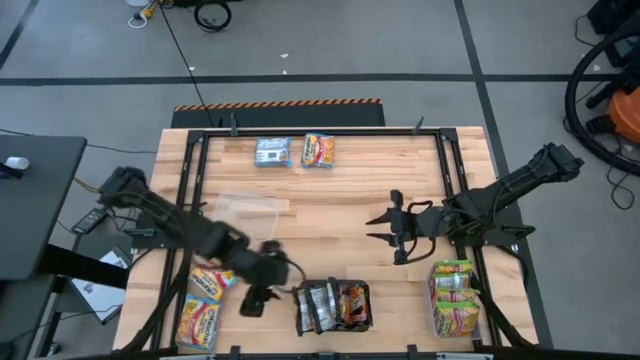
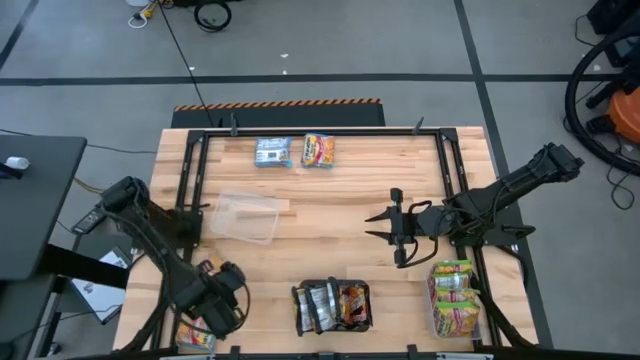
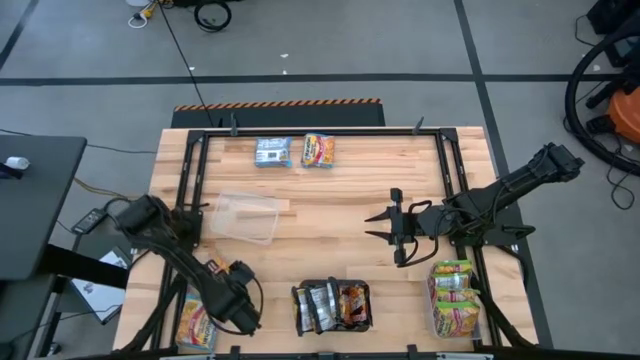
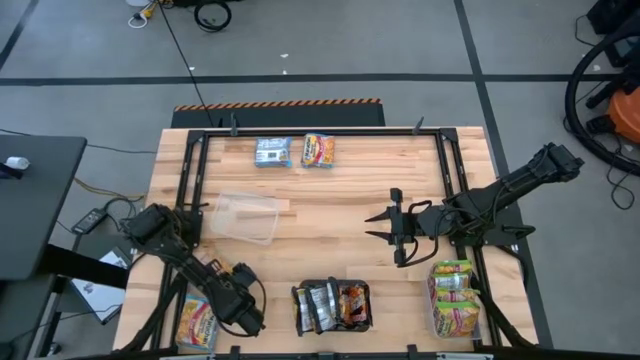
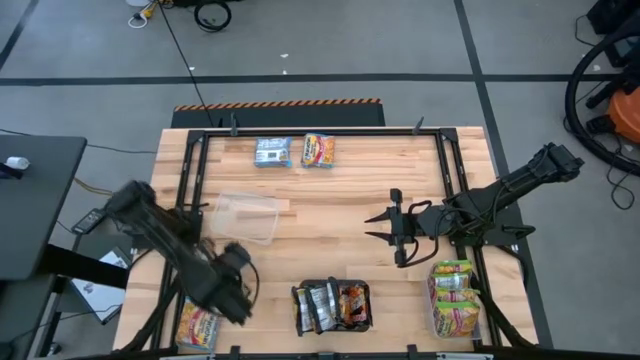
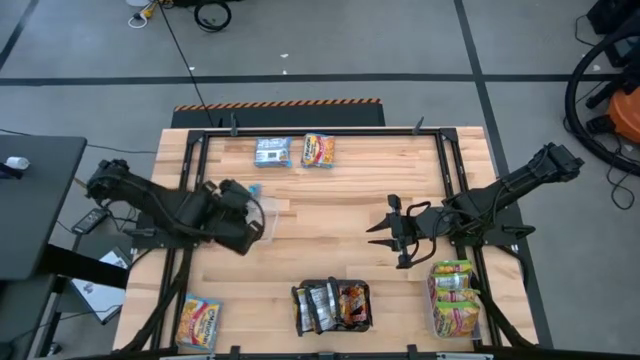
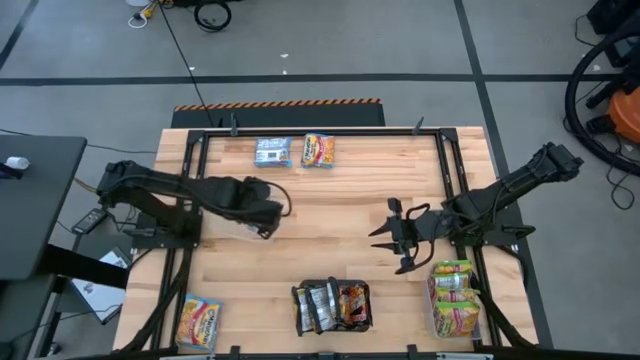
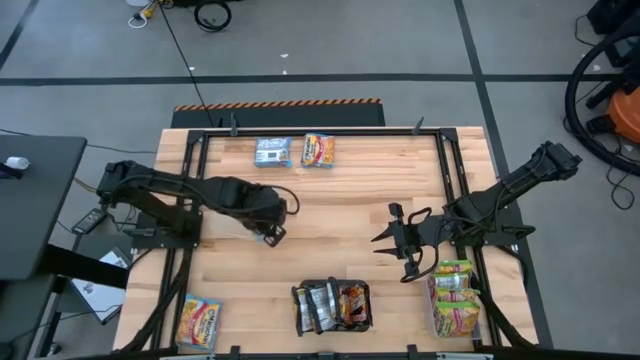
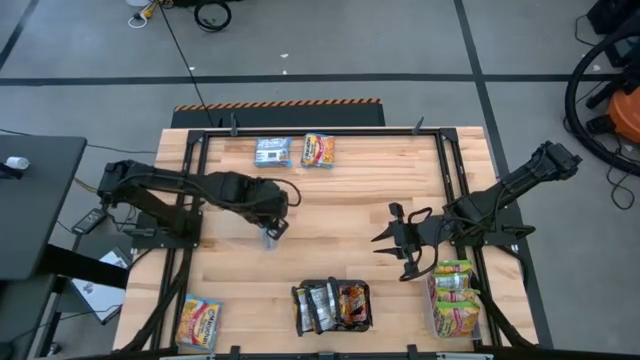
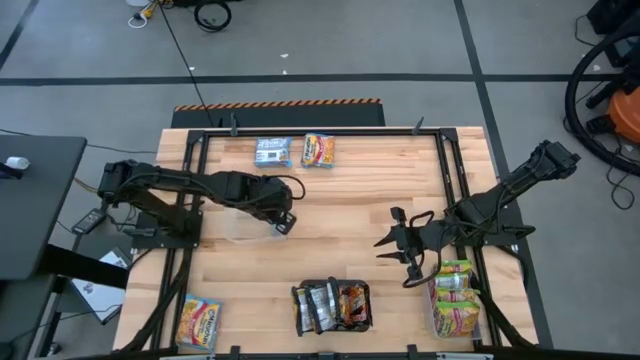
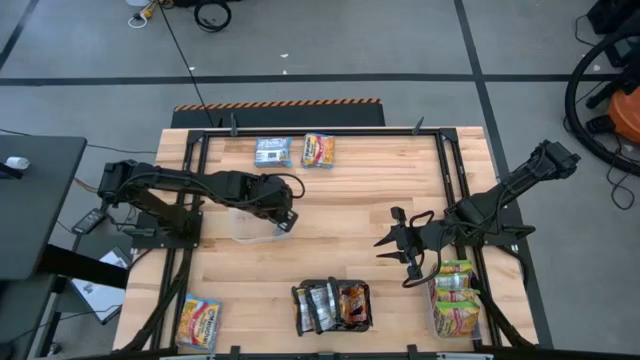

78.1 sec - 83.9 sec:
Task: Sort Maruchan noodles
Put the blue noodle pack into the top transparent bin

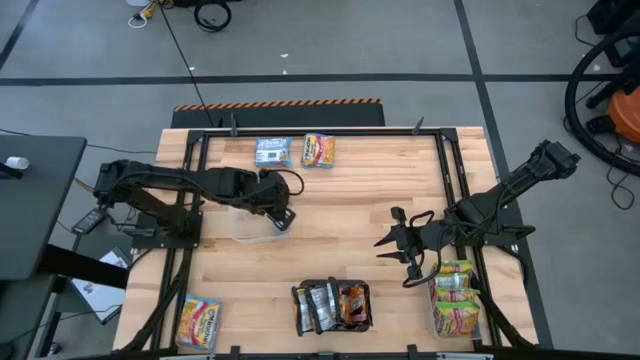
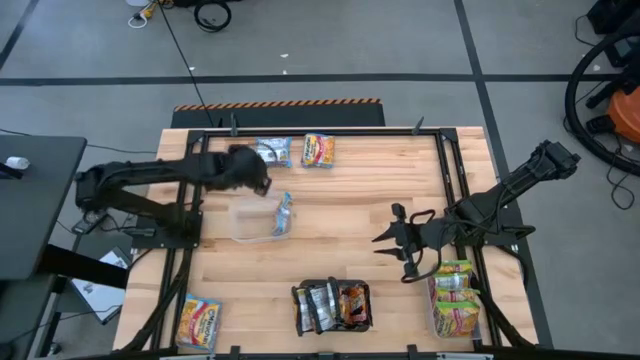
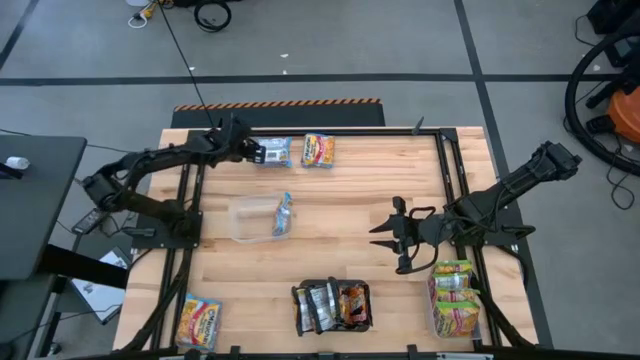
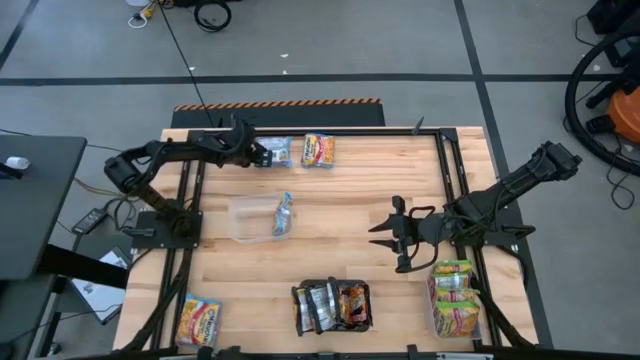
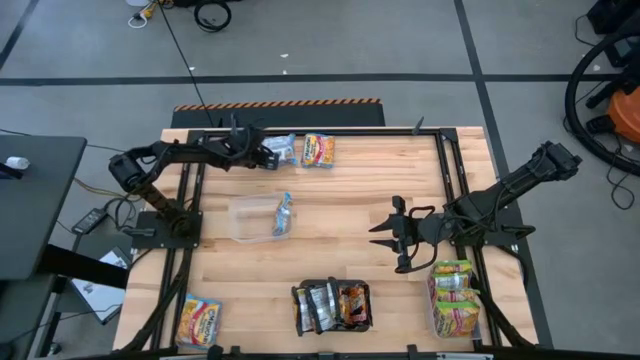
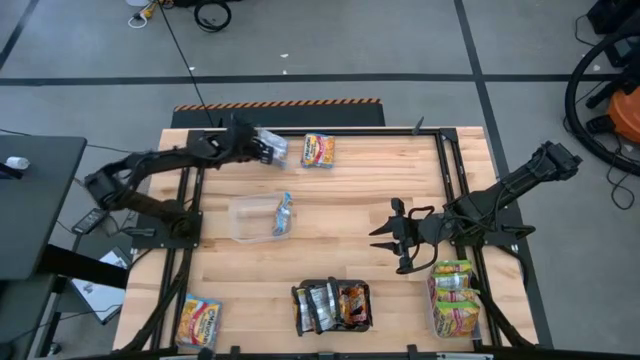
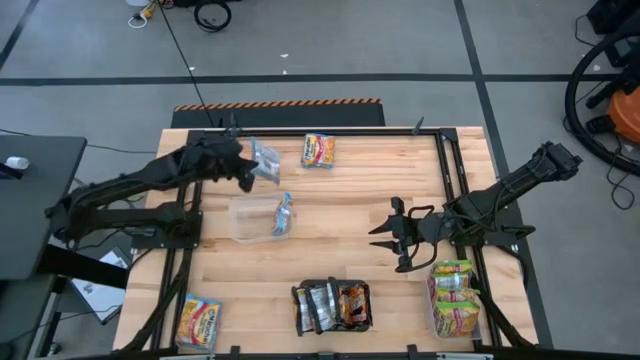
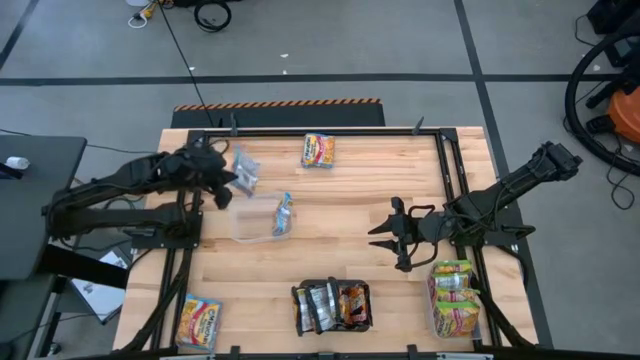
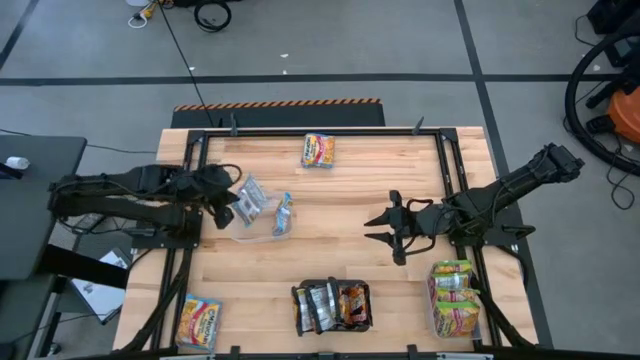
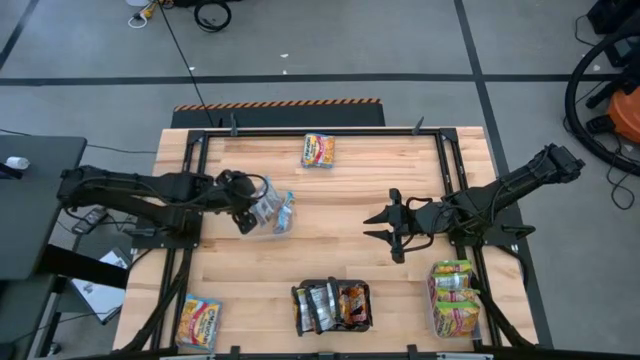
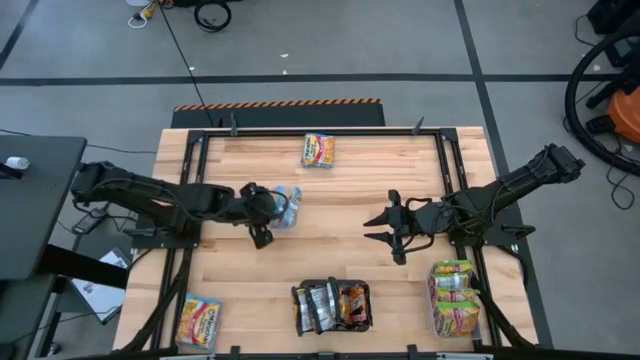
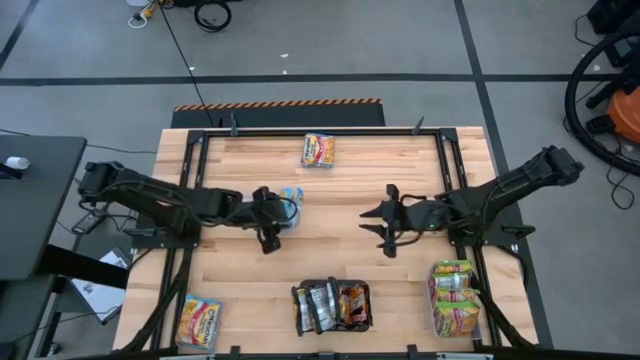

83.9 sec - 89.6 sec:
Put the top left blue noodle pack into the top transparent bin

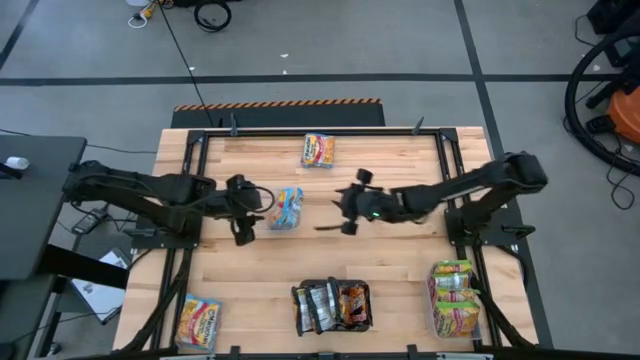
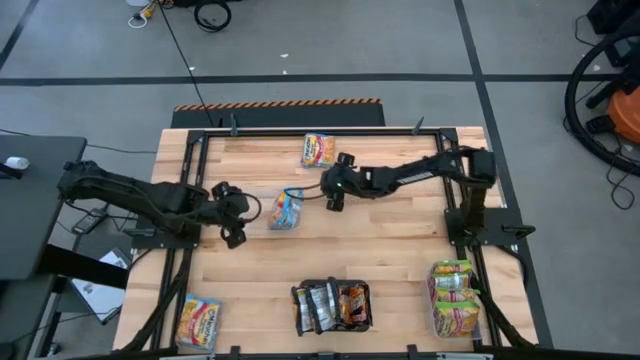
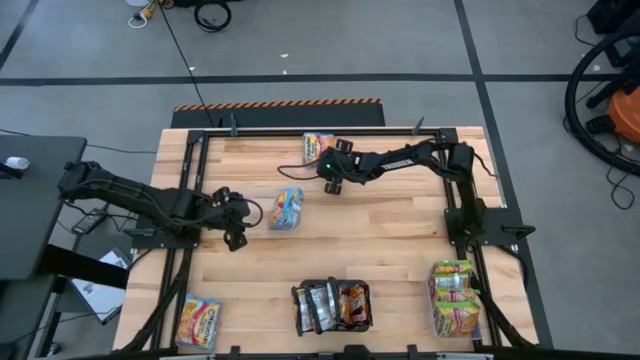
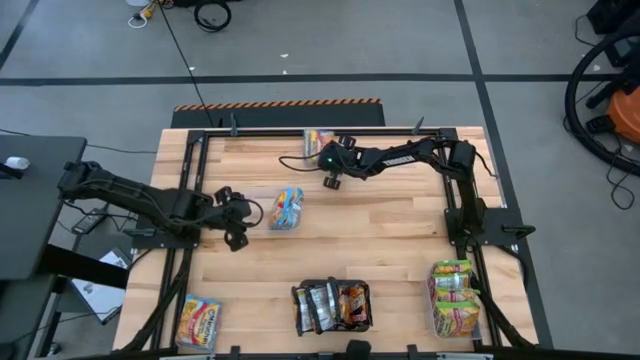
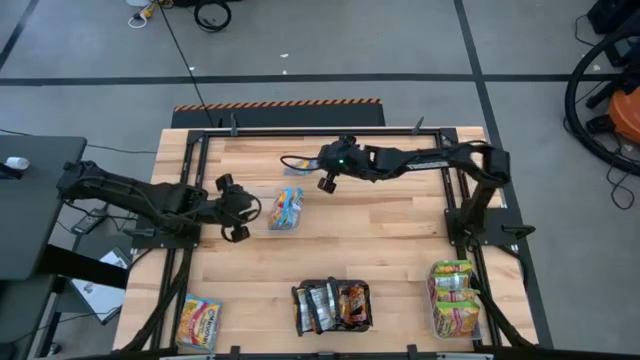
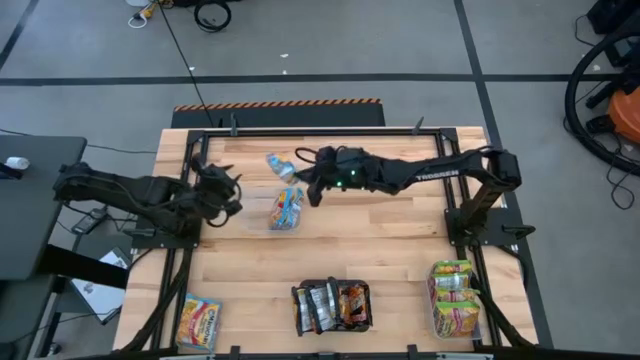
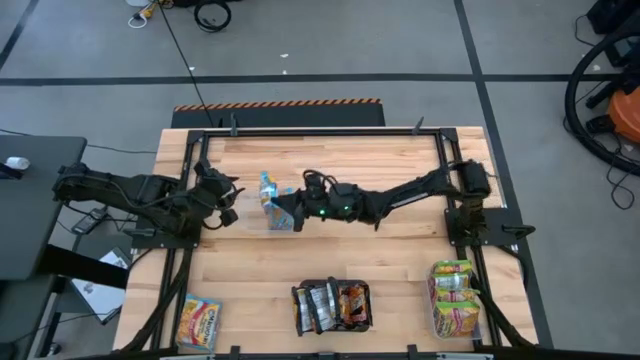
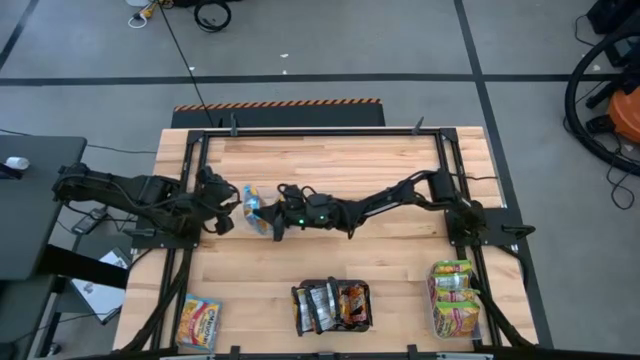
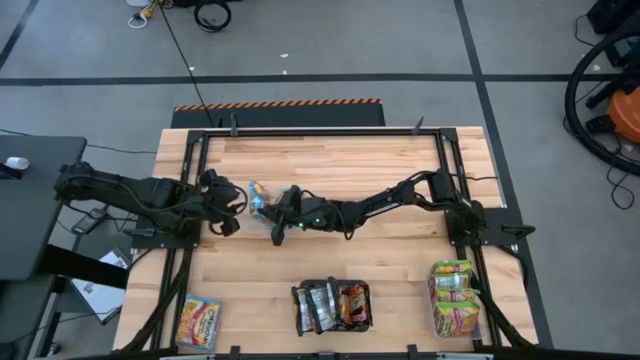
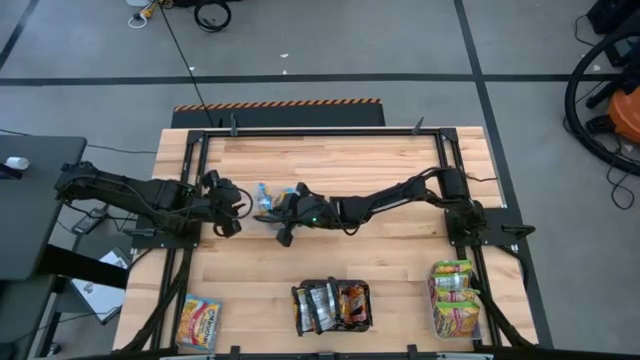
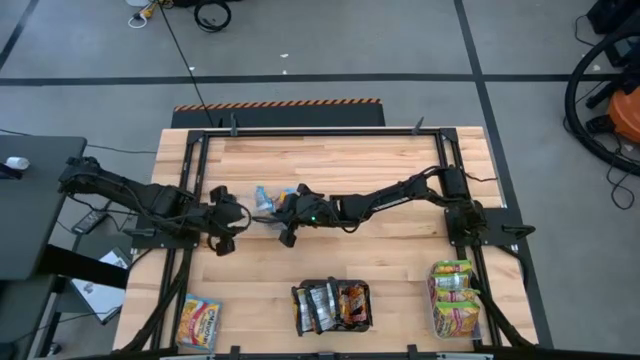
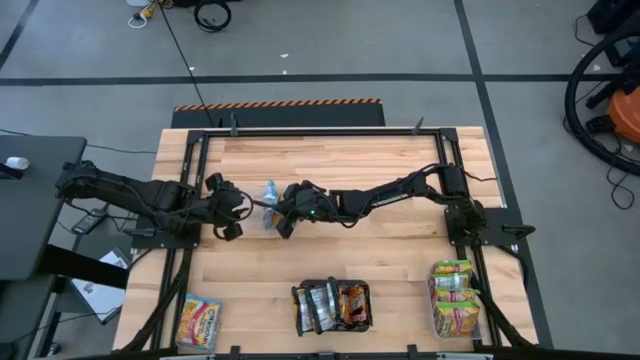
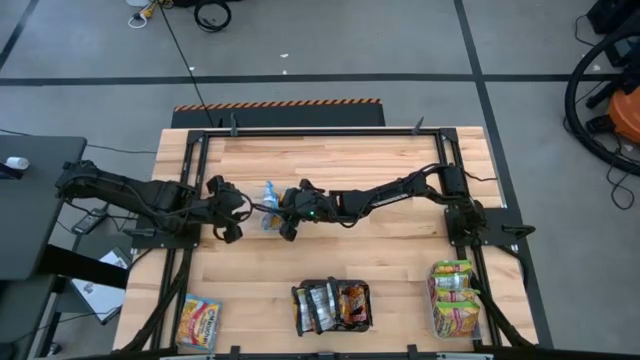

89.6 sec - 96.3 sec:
Put the top blue noodle pack into the top transparent bin

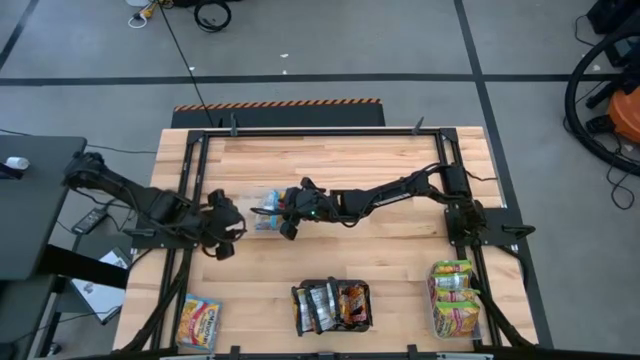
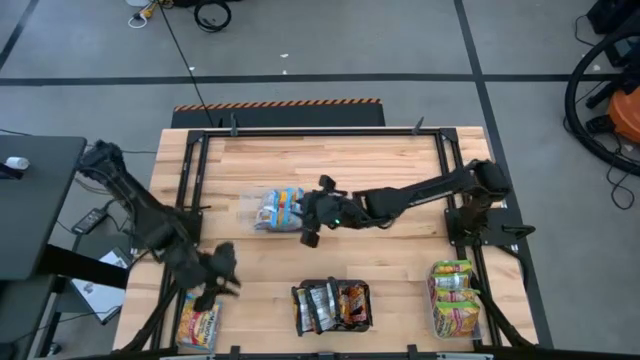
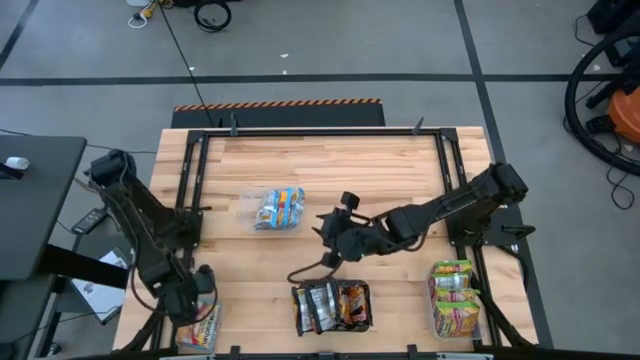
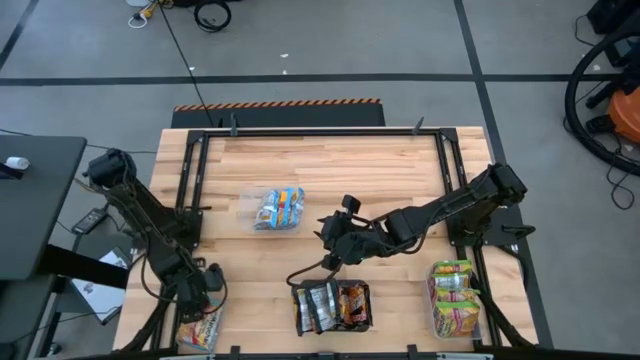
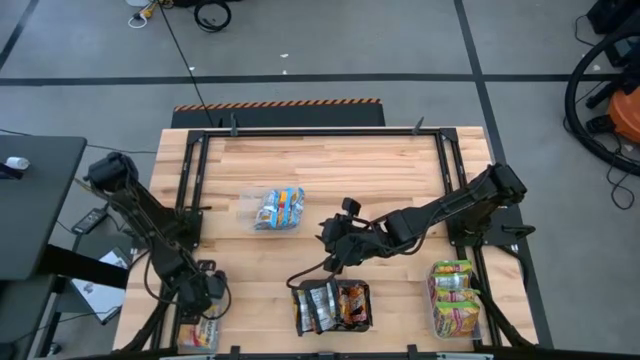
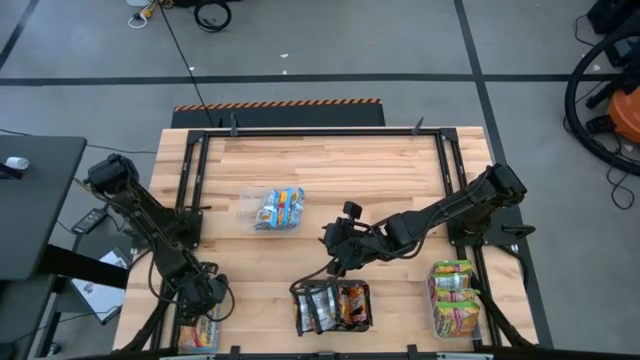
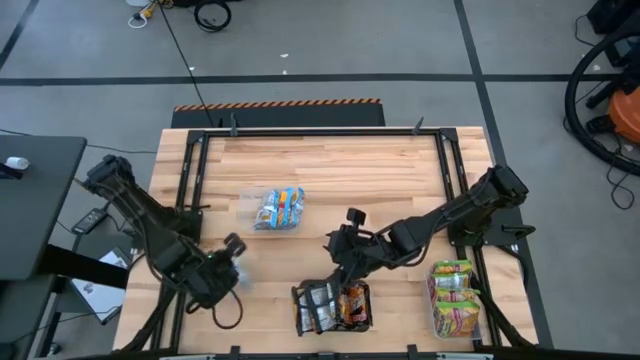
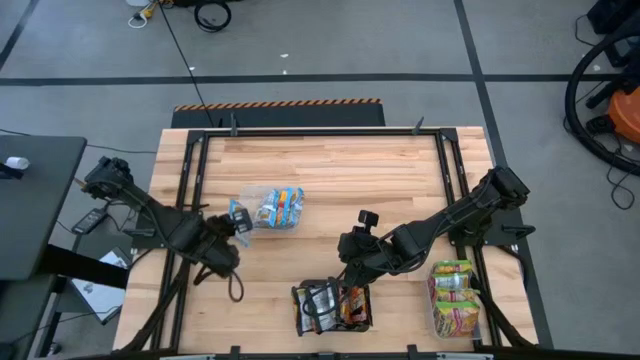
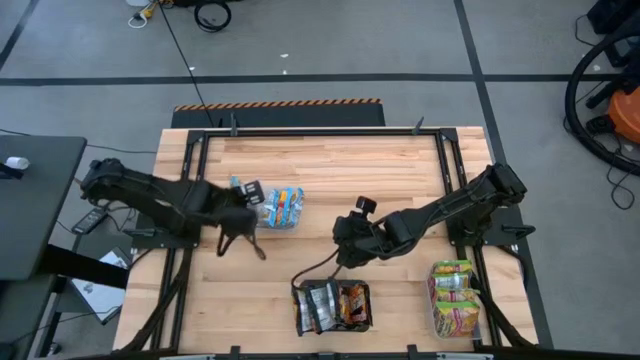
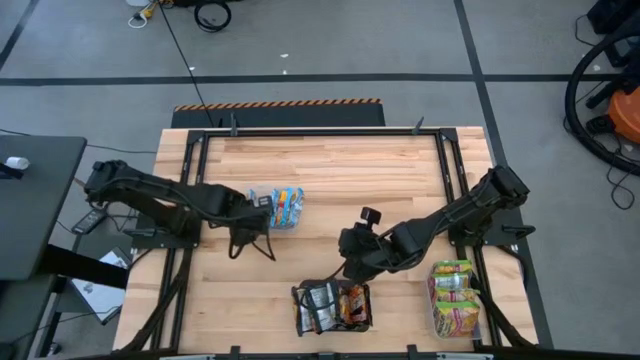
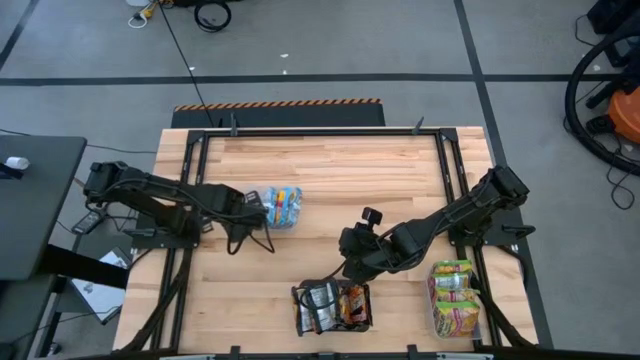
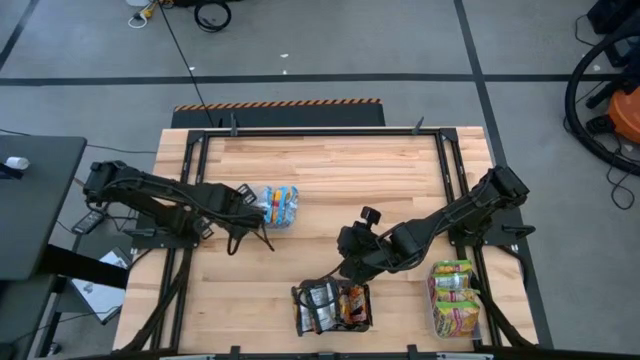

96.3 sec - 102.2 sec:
Put the blue noodle pack into the top transparent bin
